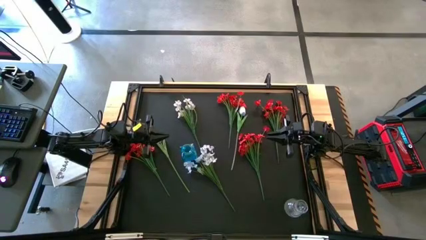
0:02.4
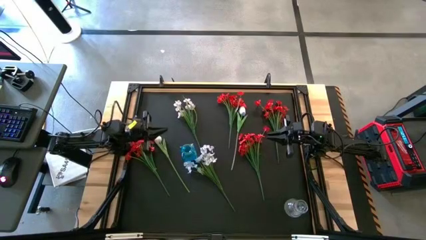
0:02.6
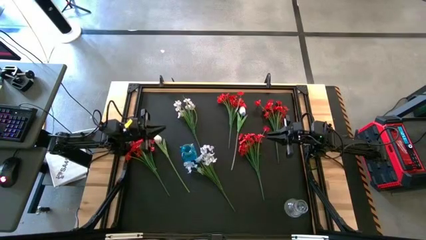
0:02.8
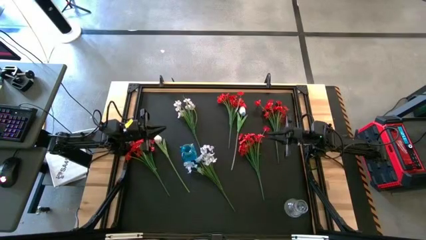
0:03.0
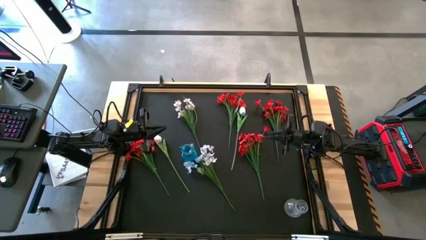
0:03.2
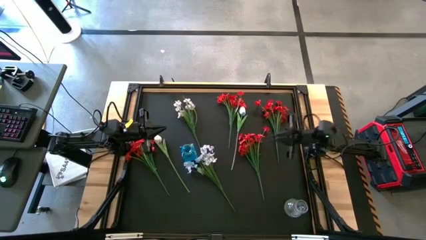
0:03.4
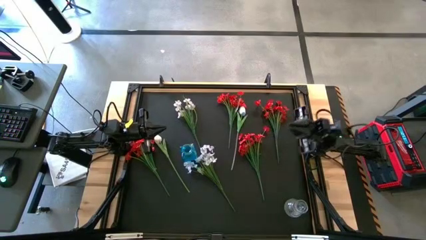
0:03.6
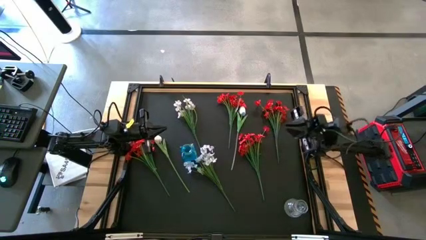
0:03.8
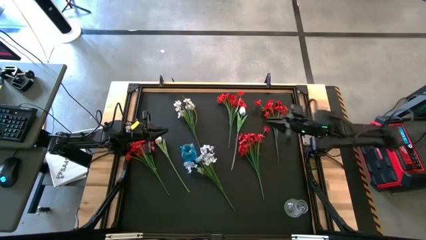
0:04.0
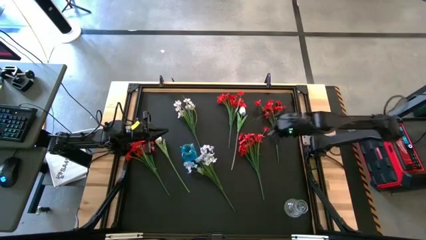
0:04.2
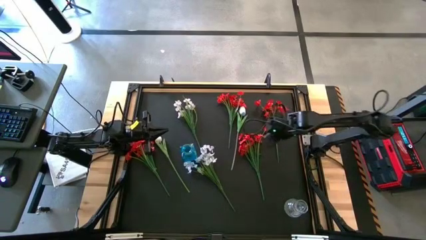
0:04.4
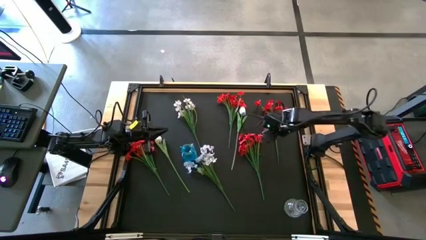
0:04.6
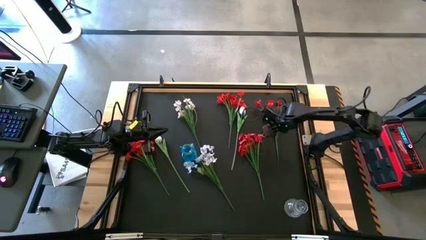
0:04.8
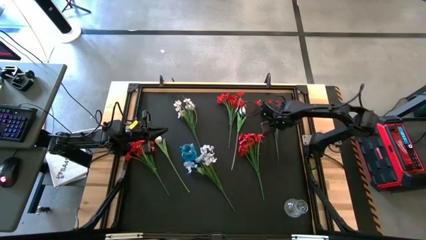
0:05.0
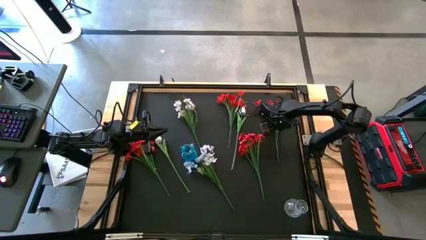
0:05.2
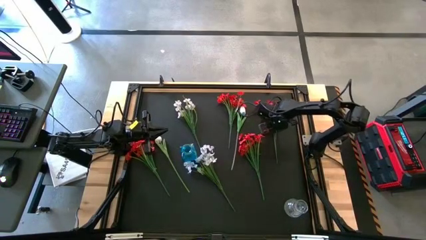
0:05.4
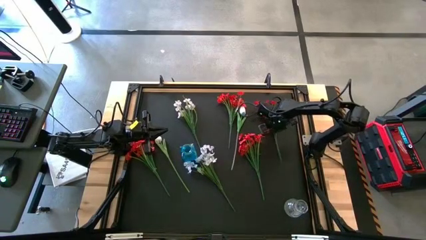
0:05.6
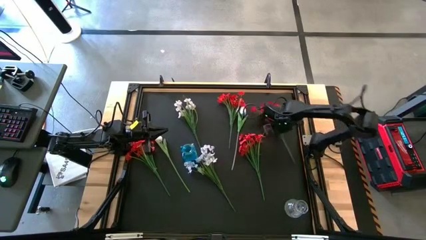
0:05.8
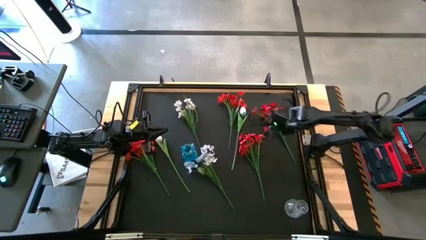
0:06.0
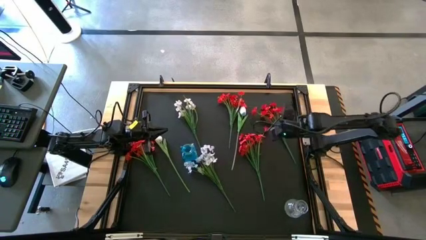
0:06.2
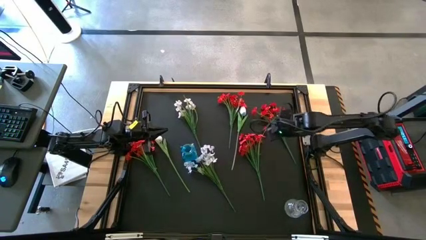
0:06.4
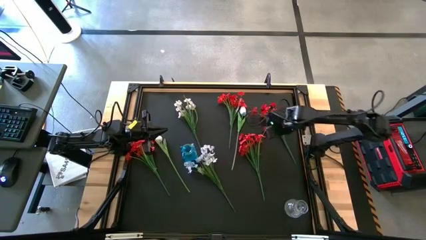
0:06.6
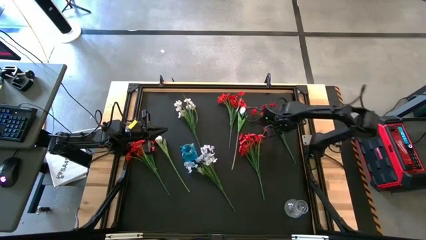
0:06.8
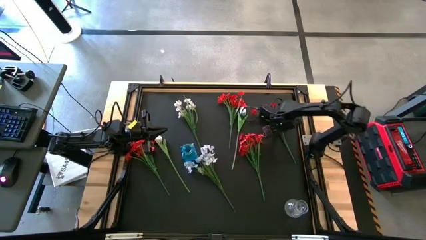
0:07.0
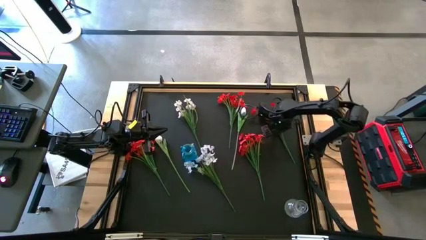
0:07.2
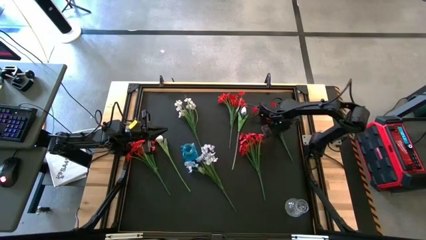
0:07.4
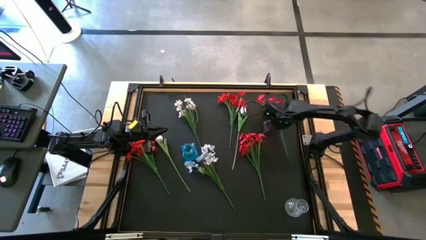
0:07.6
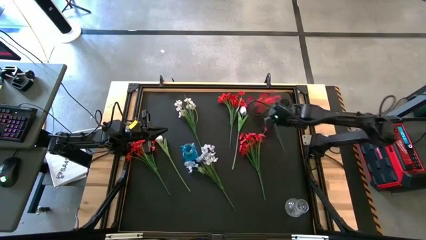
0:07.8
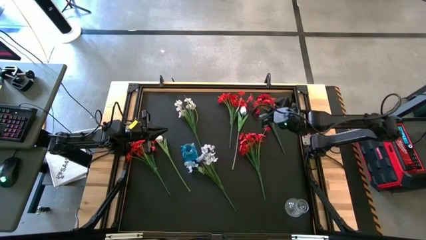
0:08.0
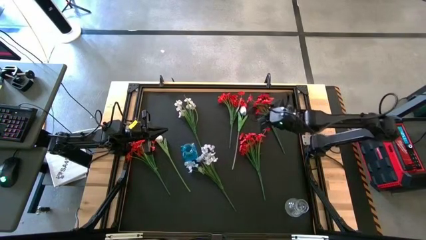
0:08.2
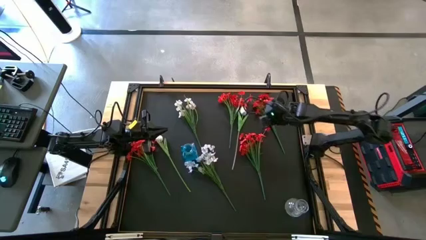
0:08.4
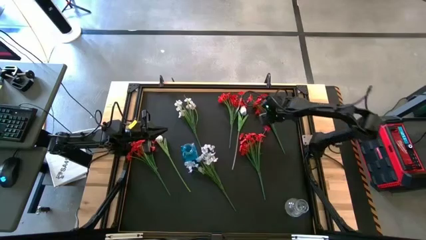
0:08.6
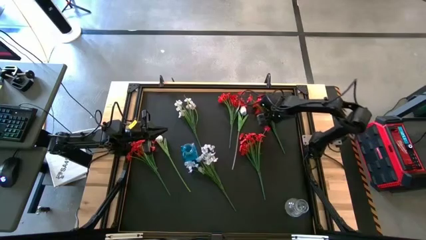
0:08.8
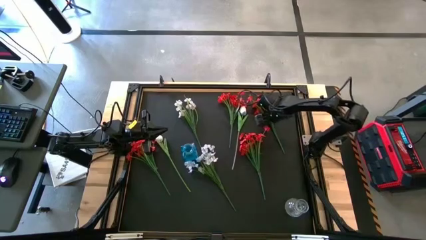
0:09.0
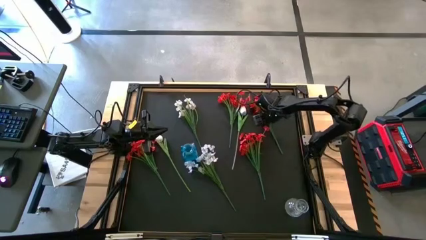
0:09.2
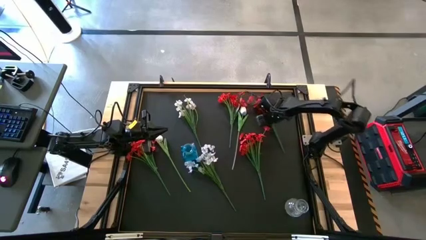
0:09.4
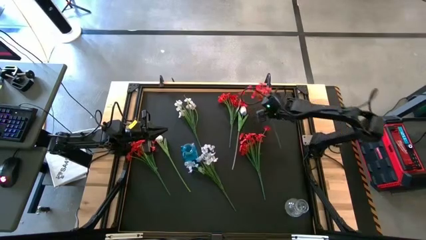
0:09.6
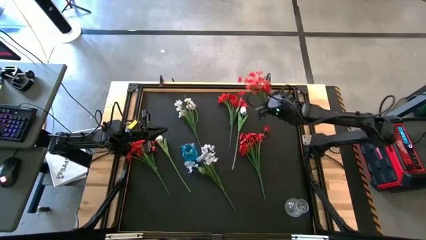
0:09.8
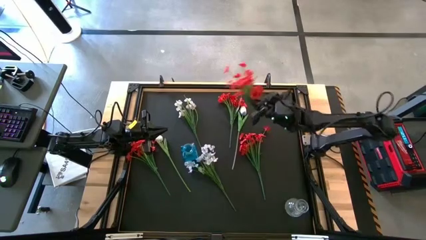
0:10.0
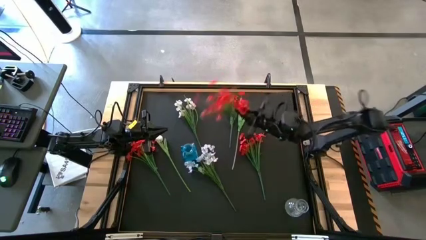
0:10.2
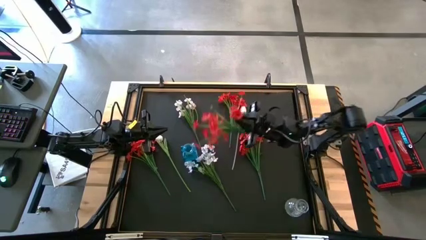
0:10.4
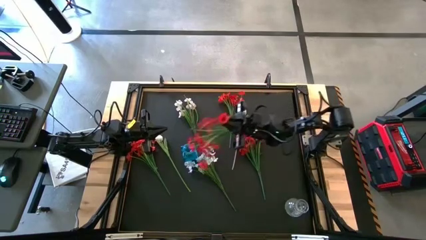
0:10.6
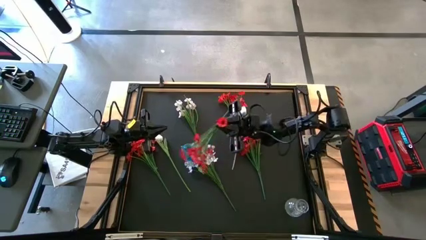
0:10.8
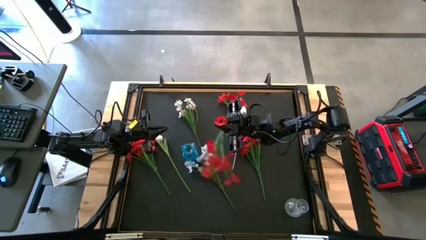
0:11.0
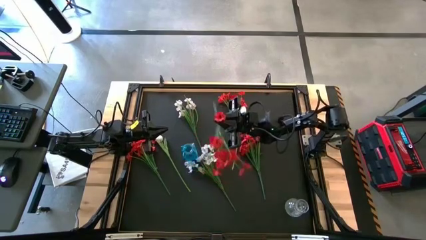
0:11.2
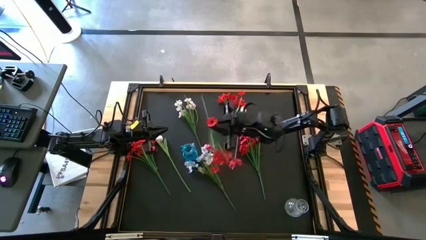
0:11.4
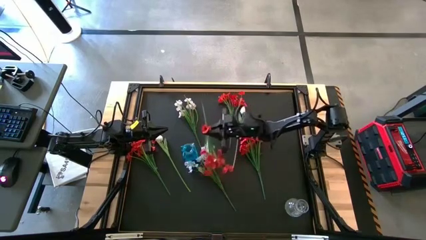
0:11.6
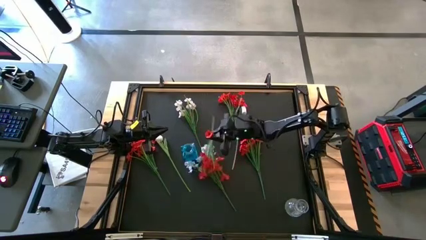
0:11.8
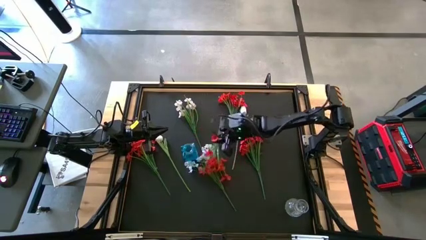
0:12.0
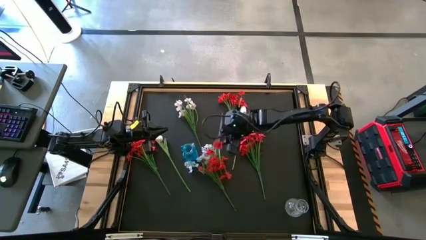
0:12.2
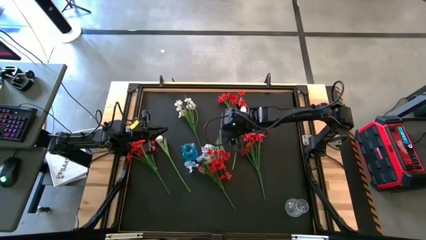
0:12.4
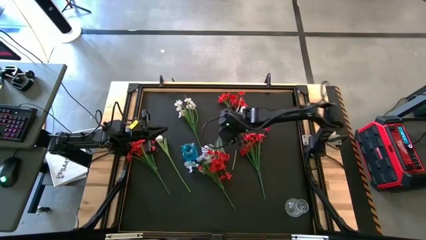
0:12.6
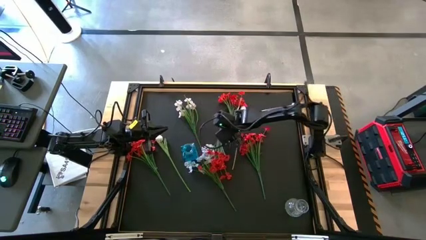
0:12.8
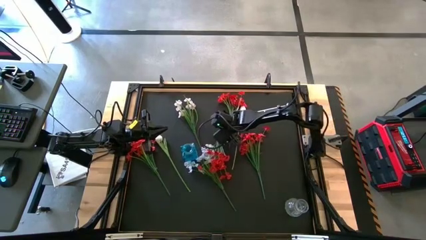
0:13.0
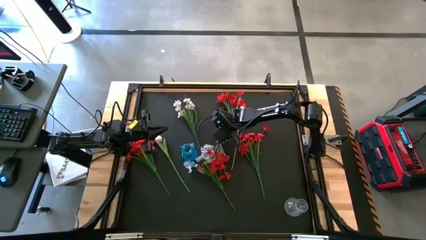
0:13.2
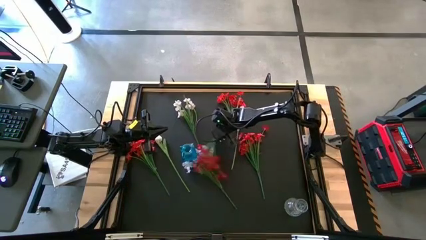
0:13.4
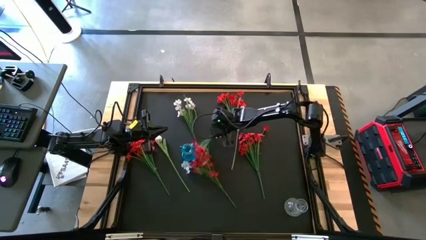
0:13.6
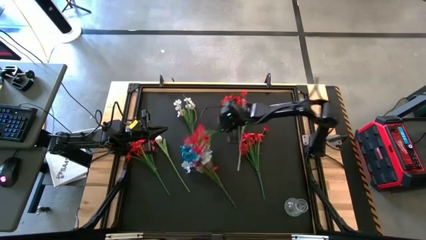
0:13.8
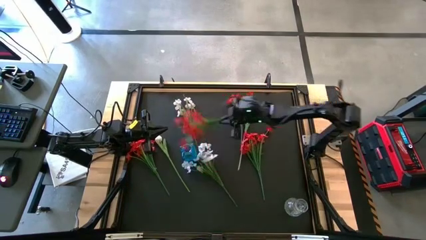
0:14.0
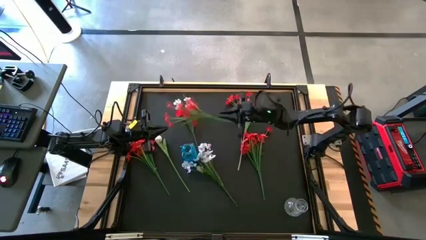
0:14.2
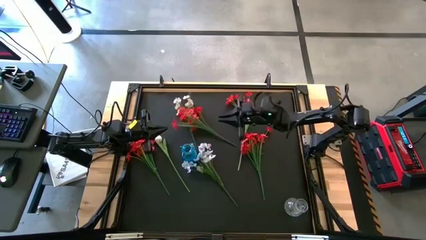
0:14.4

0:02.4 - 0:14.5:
Task: Sort flowers into vase by color
Put the red flowers into the blue vase

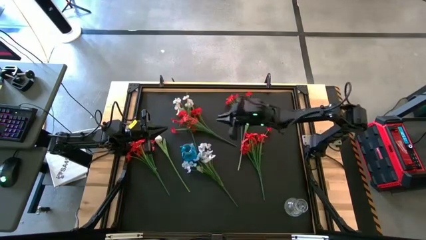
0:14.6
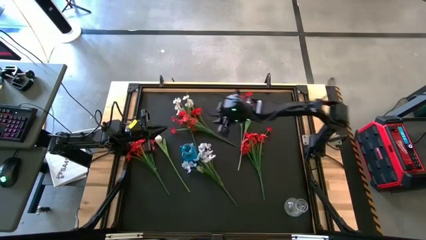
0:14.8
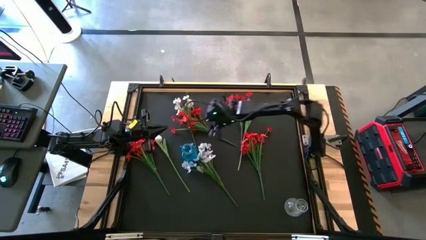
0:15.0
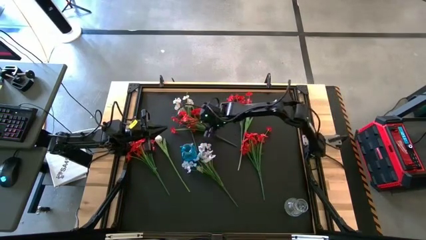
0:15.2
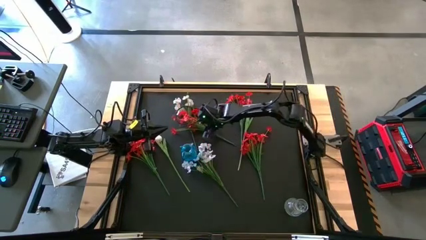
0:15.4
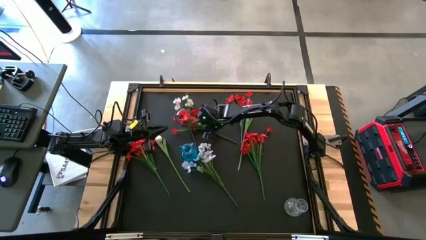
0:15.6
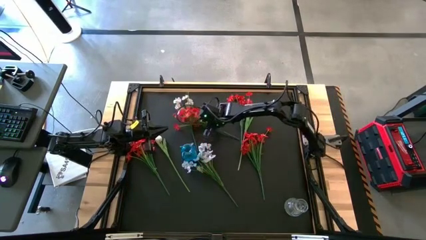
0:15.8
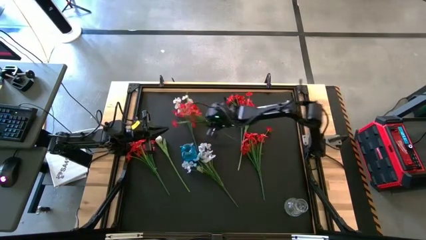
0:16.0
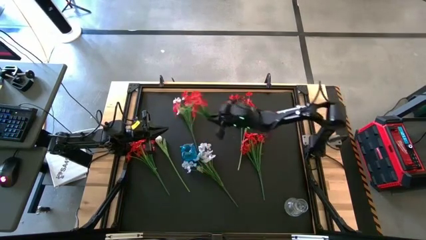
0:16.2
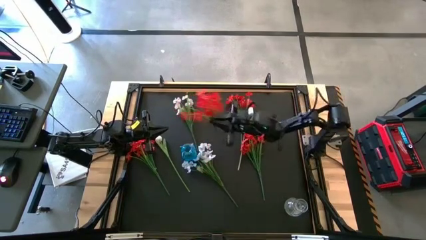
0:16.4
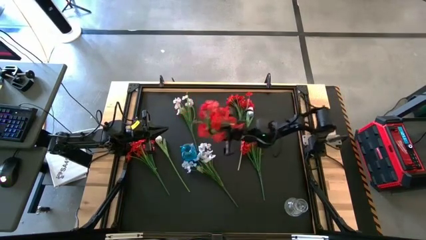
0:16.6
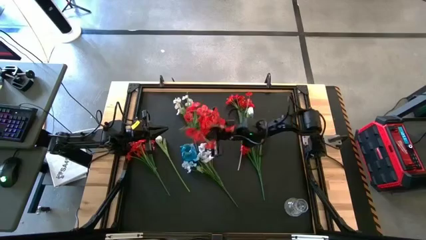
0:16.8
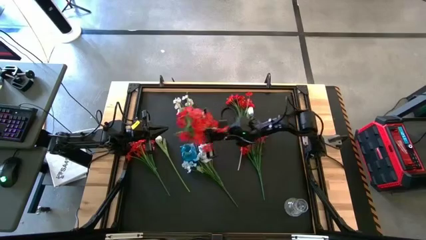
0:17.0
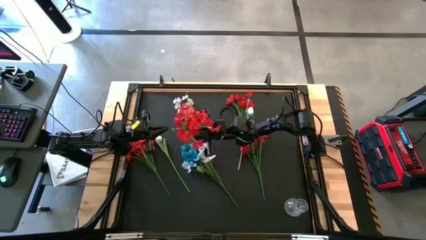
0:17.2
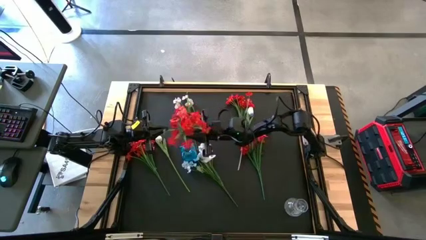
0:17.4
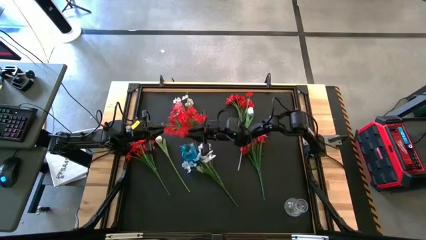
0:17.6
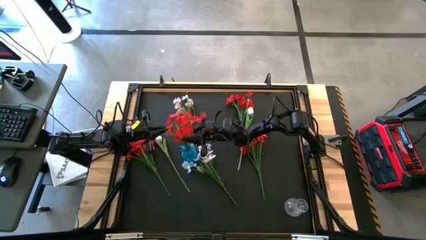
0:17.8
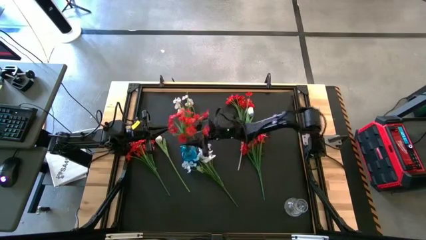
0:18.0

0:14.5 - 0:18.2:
Put the red flowers into the blue vase
